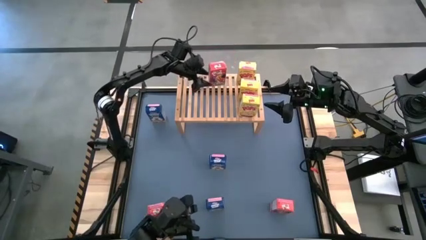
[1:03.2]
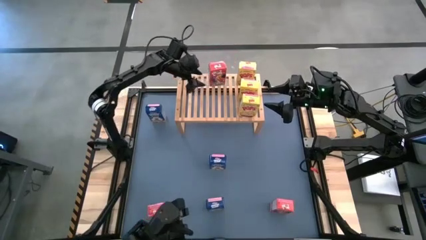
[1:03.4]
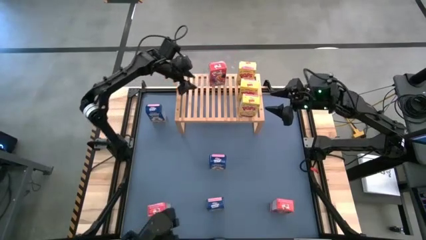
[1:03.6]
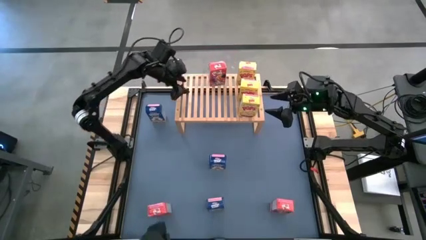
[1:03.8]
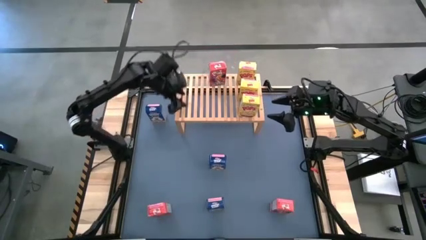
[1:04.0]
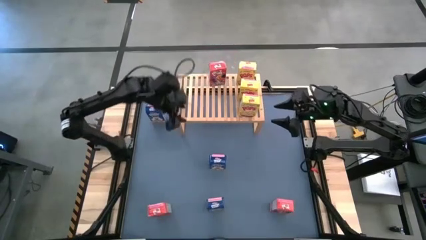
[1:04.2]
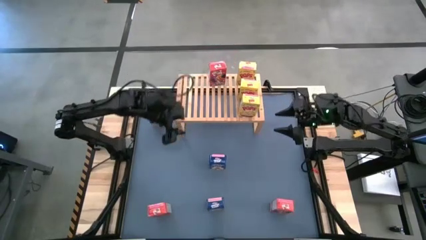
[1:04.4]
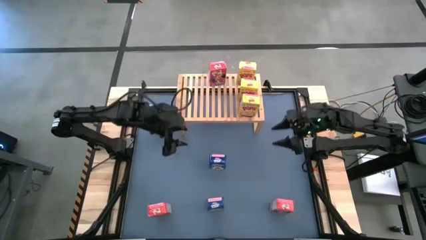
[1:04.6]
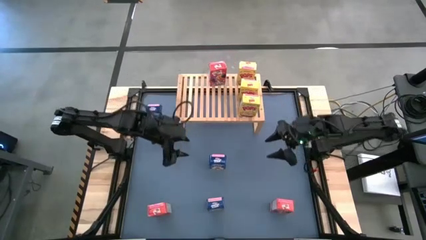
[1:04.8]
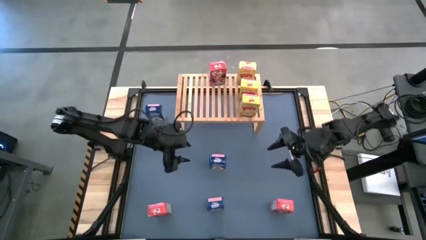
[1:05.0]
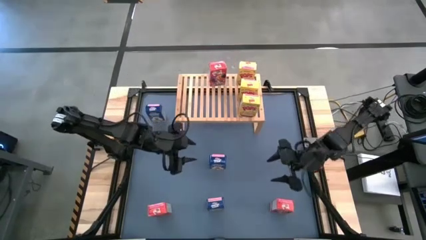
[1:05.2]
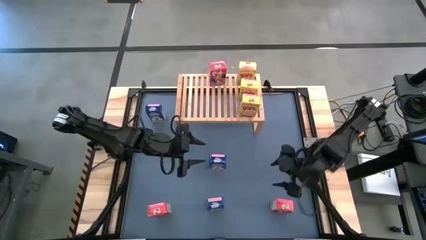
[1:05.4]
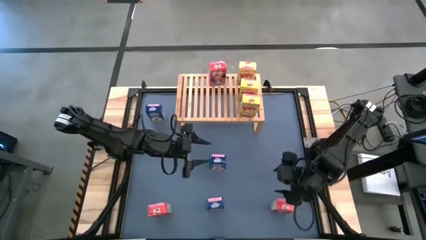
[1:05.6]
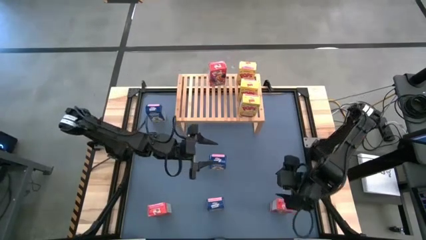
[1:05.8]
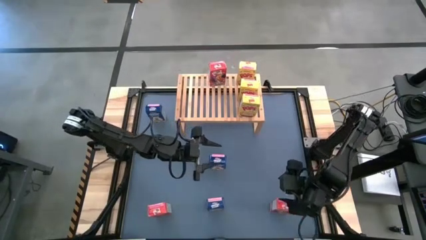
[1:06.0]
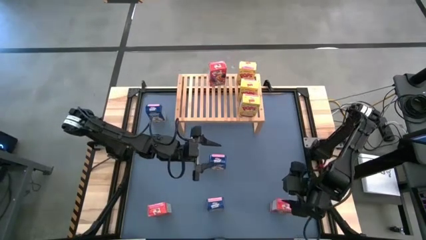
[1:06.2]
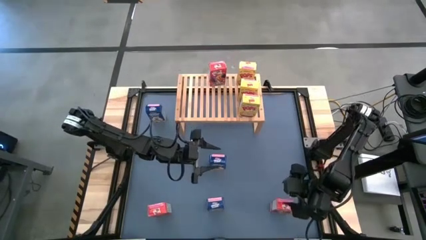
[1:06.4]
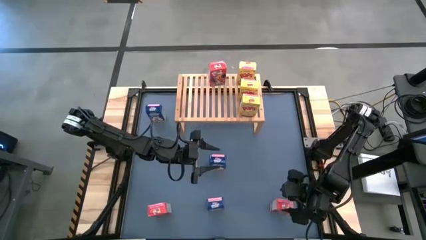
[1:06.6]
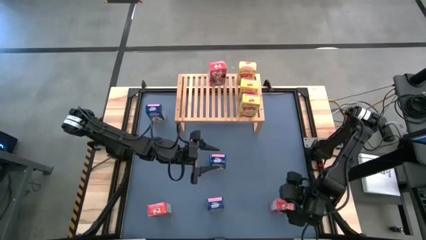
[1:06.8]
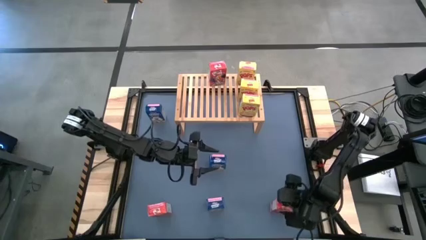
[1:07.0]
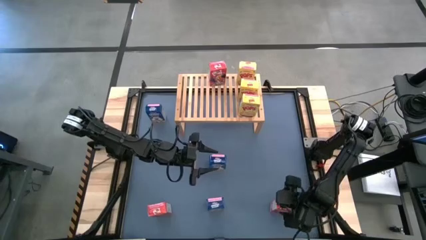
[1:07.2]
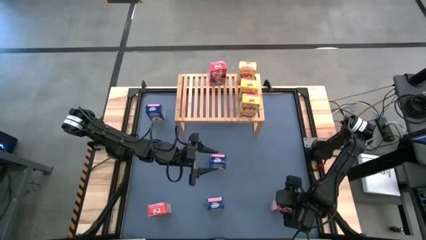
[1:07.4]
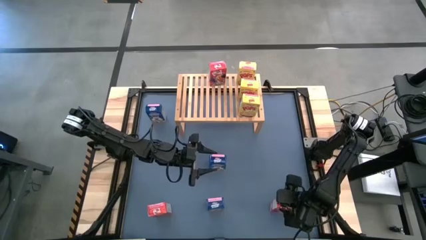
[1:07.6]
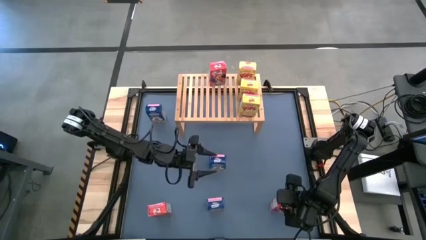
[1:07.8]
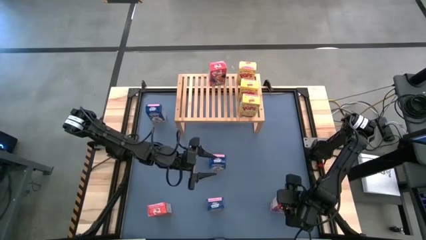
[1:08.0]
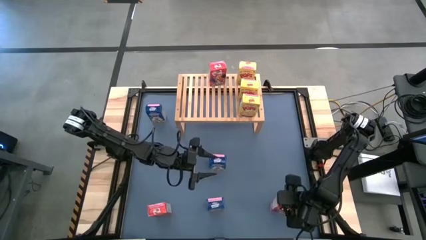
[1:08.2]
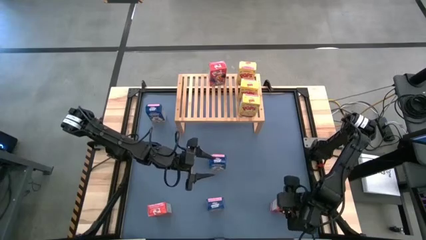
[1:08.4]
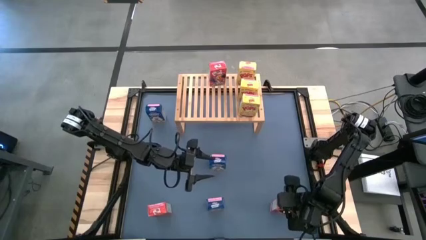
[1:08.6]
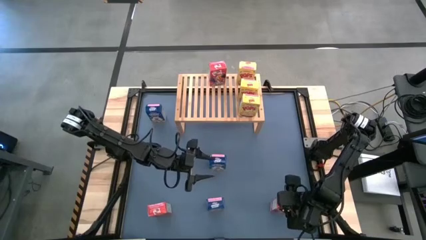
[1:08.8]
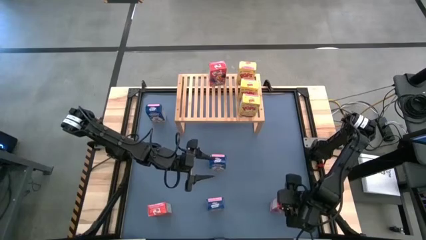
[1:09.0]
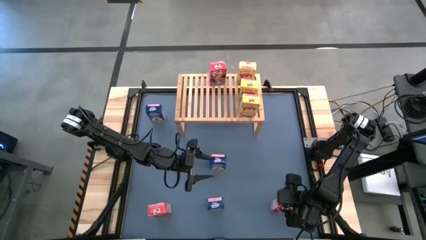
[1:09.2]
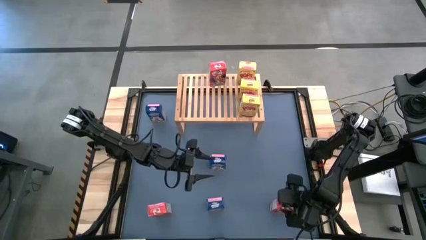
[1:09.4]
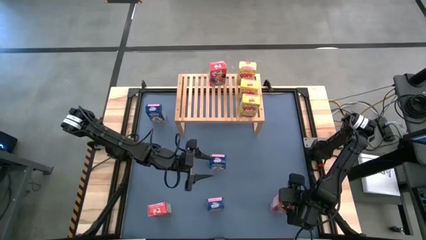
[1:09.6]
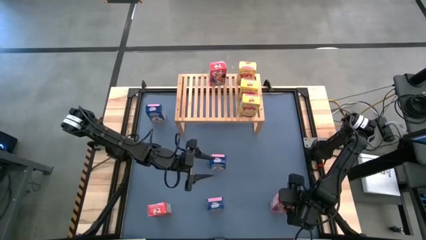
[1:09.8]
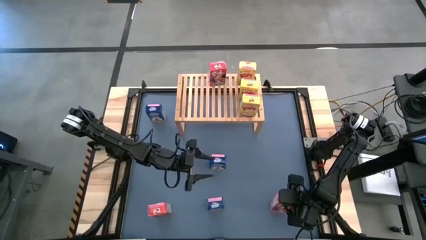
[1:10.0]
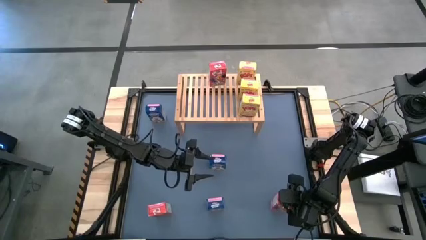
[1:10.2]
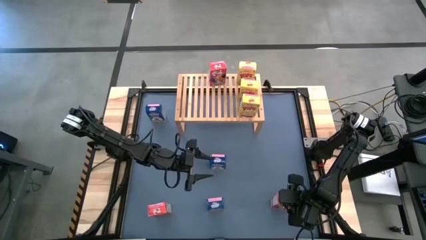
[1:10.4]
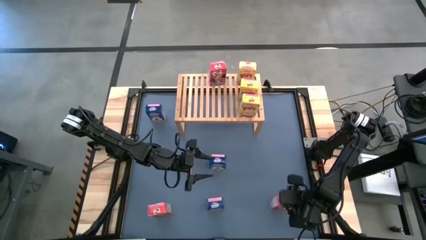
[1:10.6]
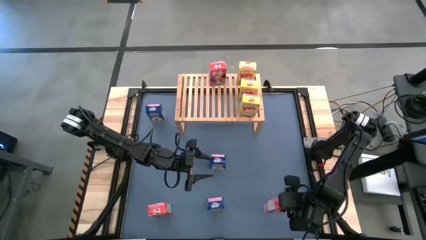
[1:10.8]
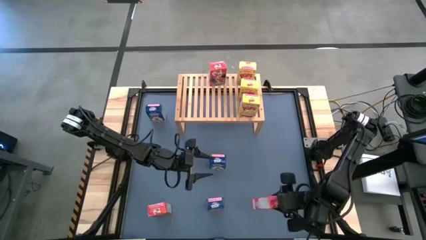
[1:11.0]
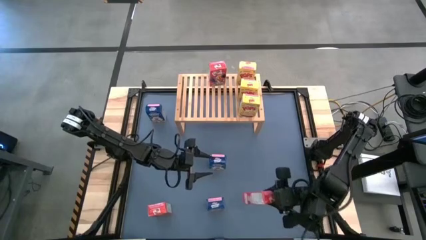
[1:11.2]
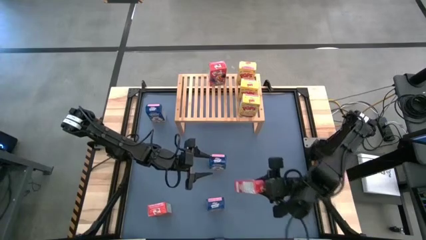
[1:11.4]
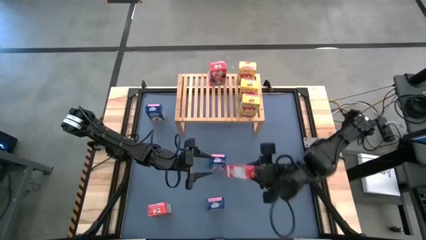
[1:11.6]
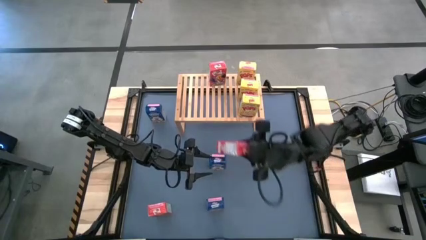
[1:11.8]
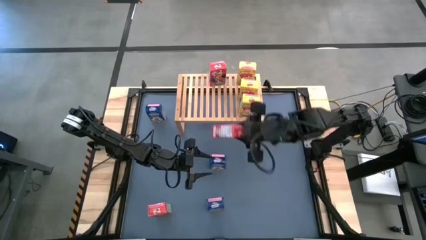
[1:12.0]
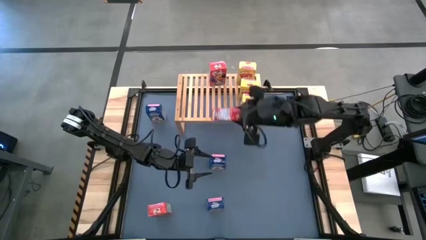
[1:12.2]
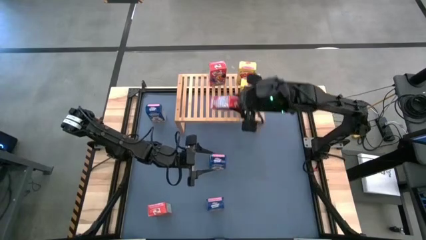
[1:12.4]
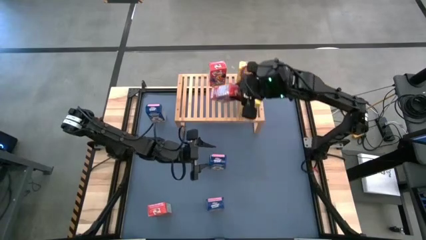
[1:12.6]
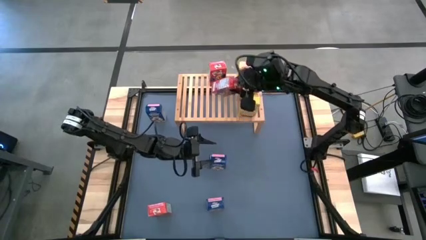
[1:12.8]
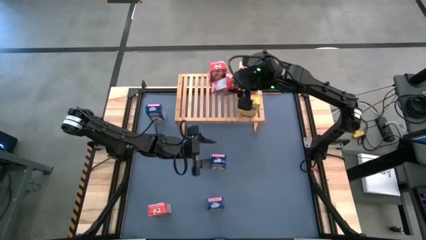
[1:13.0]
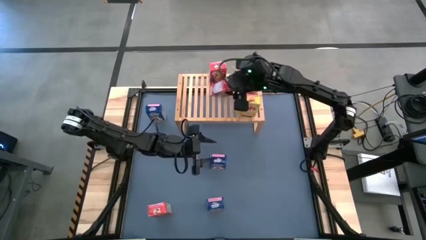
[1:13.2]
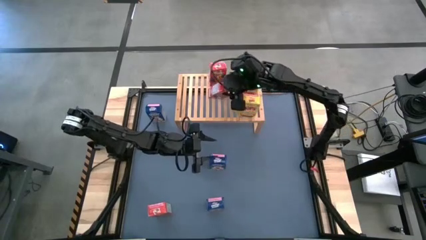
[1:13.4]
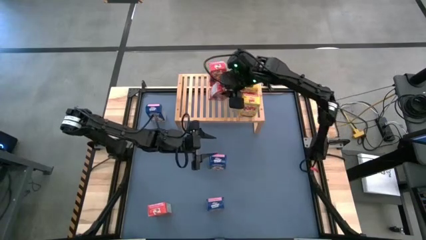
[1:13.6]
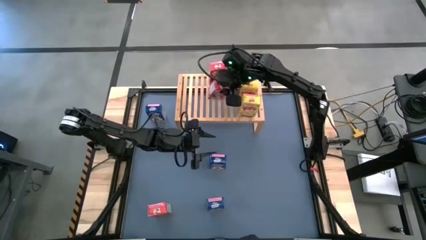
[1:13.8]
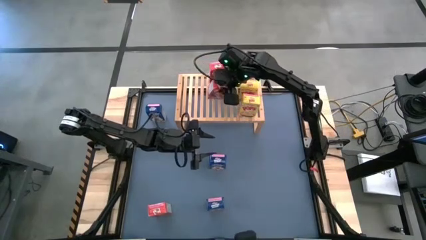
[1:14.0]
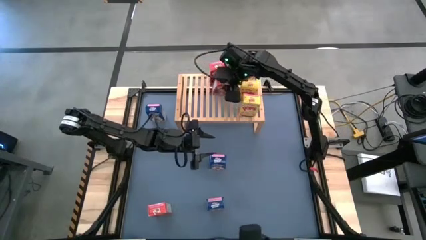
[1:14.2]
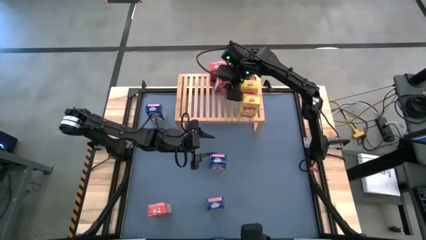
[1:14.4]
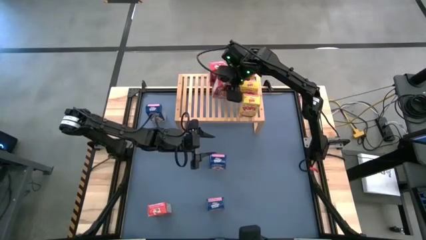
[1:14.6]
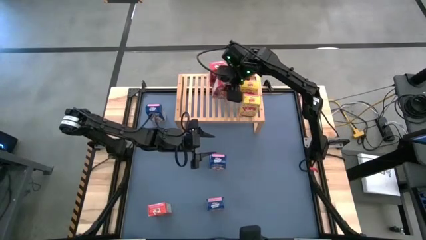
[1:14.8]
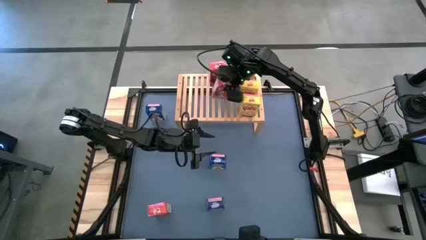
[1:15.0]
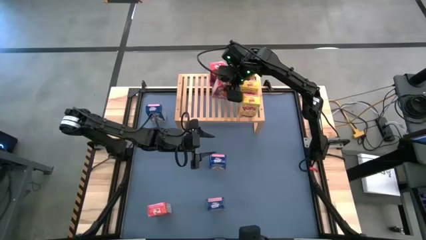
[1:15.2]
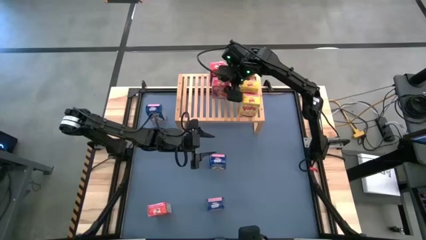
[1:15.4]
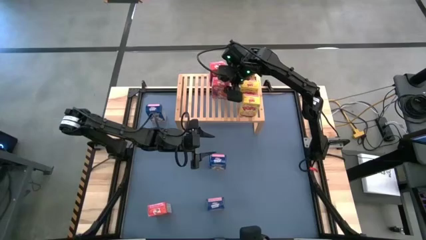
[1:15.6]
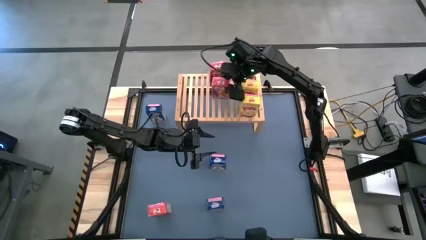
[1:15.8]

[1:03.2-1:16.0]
Task: Stack cereal on shelf
Put the right red cereal box on the shelf aligned with the other red cereal box

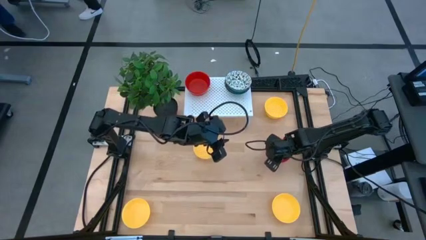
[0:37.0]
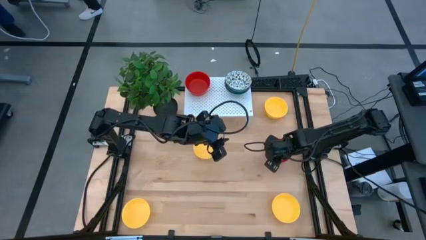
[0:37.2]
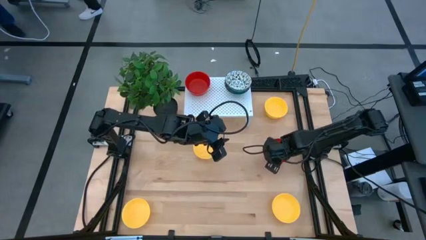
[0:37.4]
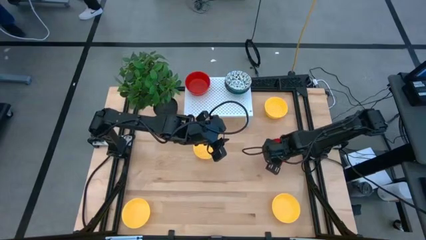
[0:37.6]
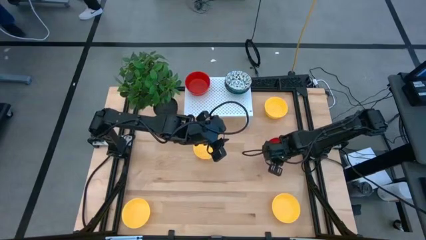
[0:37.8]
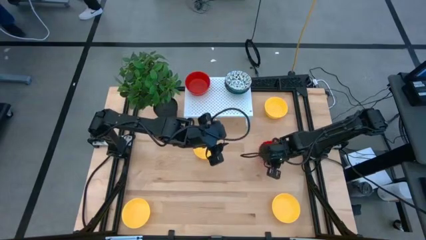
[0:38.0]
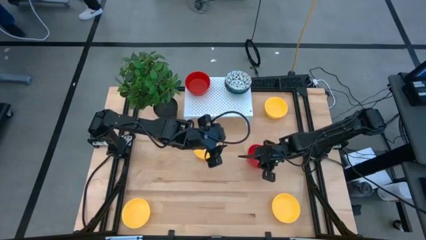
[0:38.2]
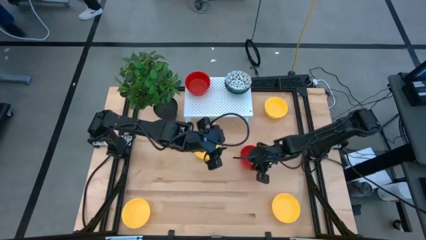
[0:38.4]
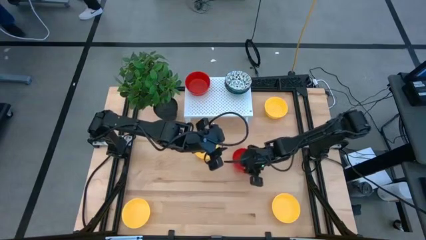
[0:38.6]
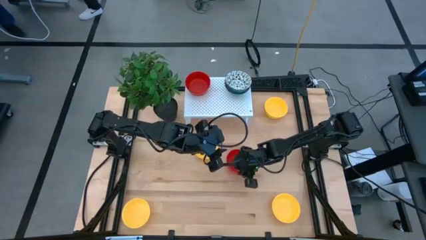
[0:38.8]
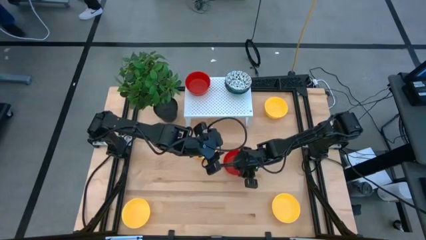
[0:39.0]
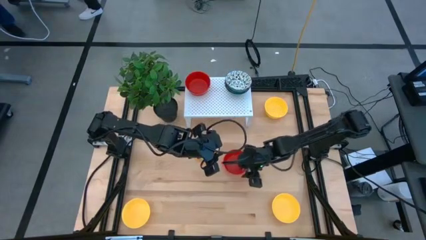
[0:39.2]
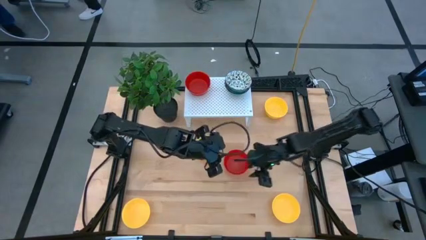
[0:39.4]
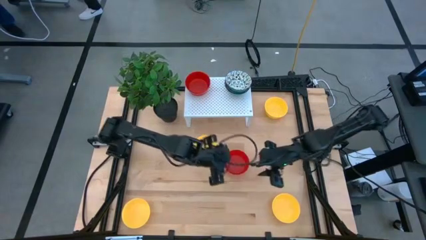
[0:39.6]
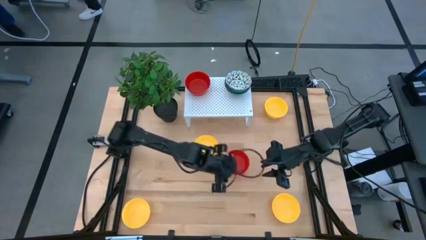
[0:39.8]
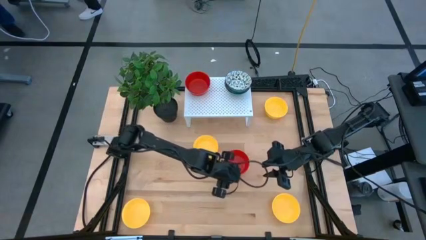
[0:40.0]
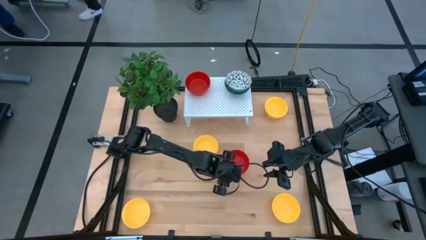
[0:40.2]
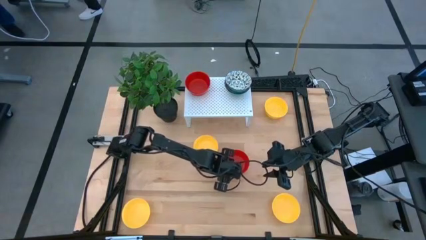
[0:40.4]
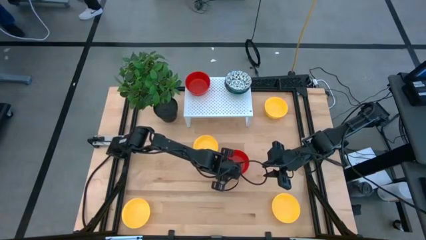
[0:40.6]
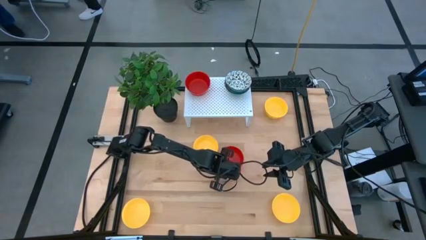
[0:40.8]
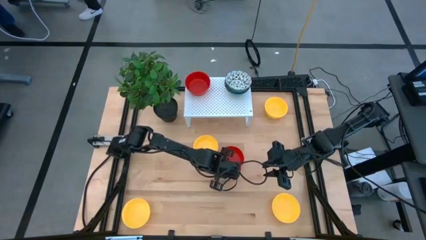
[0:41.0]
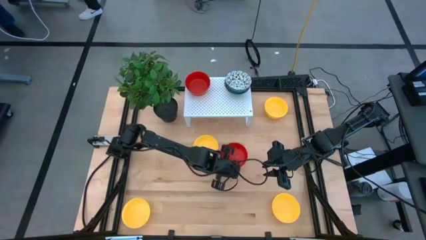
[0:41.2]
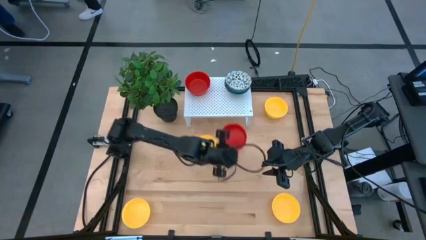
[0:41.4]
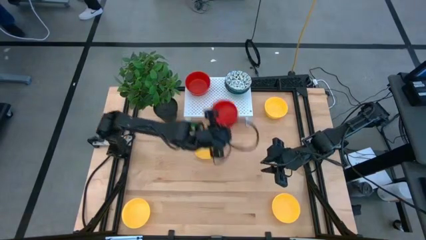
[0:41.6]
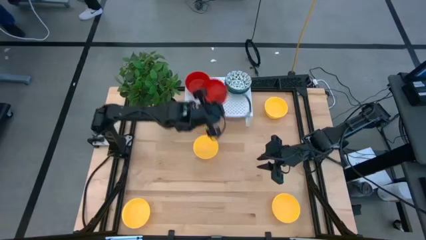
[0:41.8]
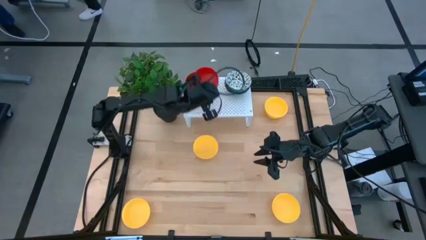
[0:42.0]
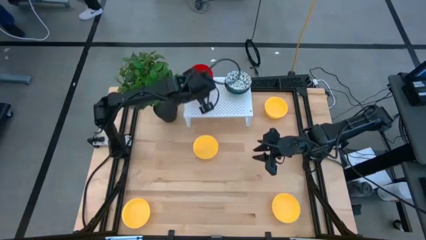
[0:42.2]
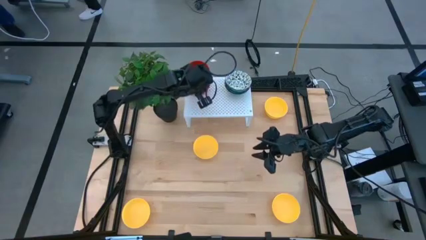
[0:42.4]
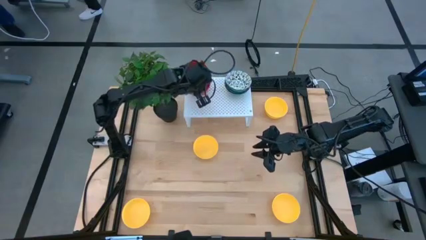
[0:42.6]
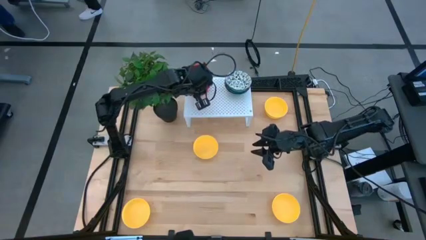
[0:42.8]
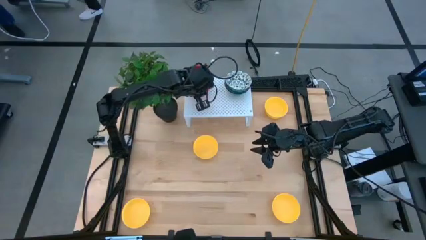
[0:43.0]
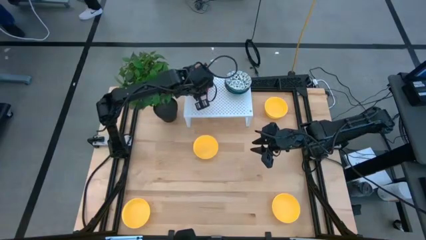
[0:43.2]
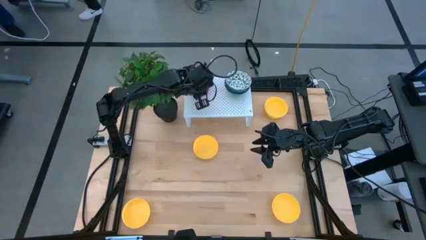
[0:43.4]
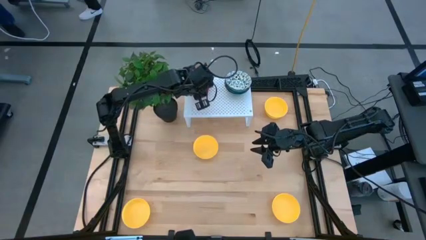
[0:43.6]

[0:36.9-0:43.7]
Task: Pick & Place Mini bowls
Stack the red bowl on the red bowl on the shelf
